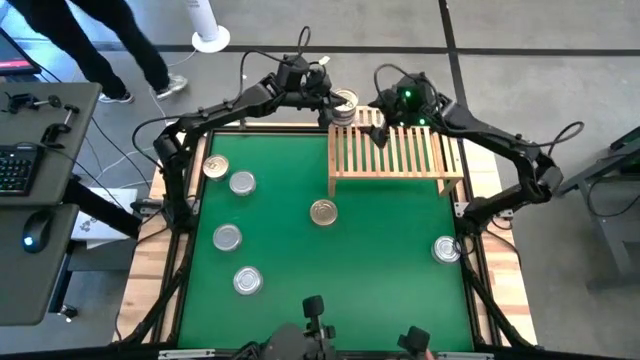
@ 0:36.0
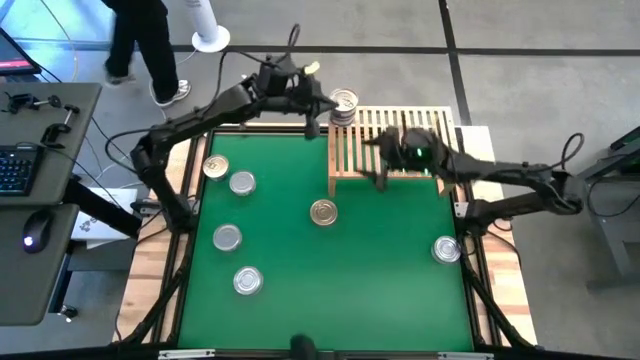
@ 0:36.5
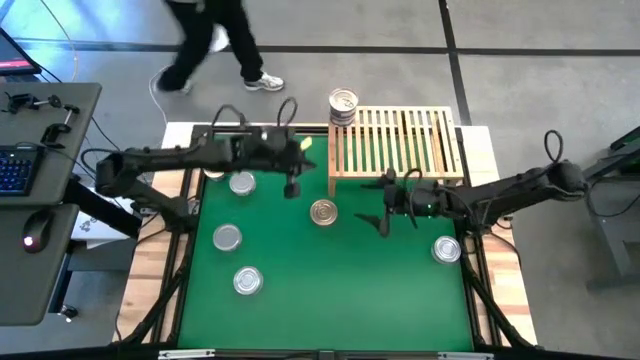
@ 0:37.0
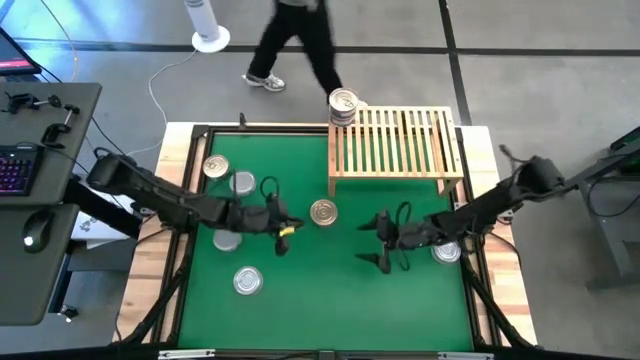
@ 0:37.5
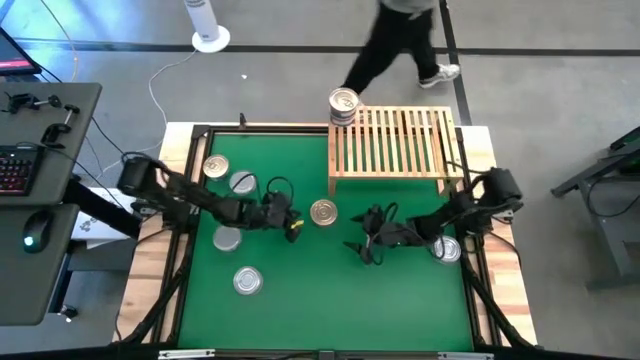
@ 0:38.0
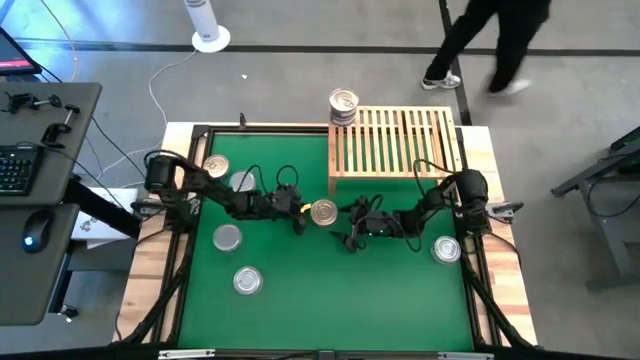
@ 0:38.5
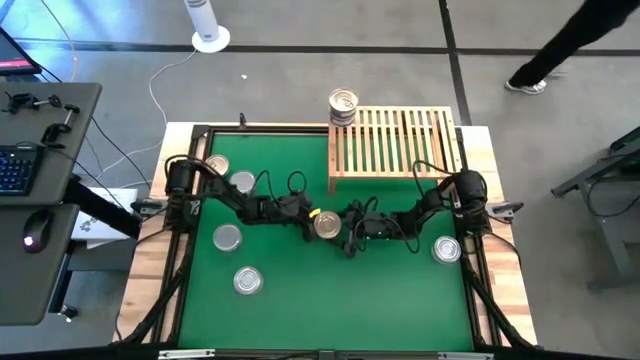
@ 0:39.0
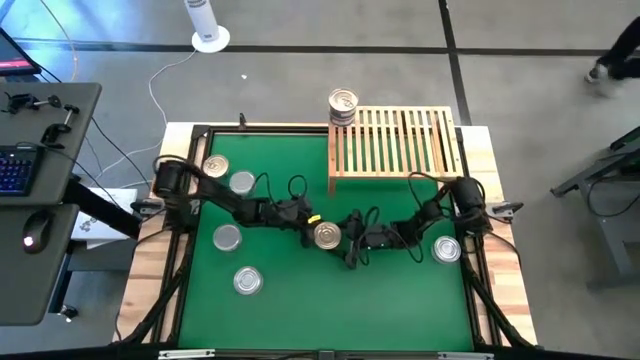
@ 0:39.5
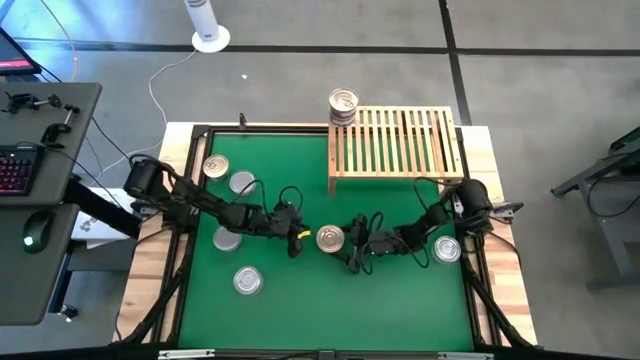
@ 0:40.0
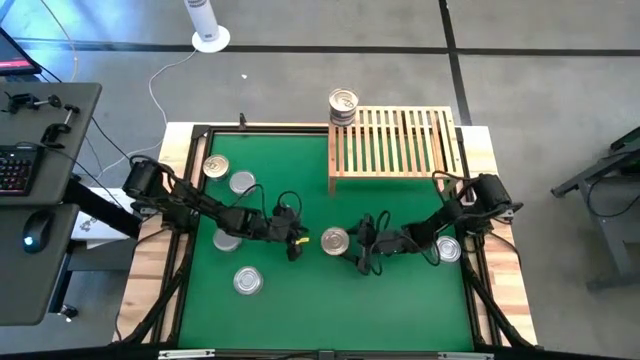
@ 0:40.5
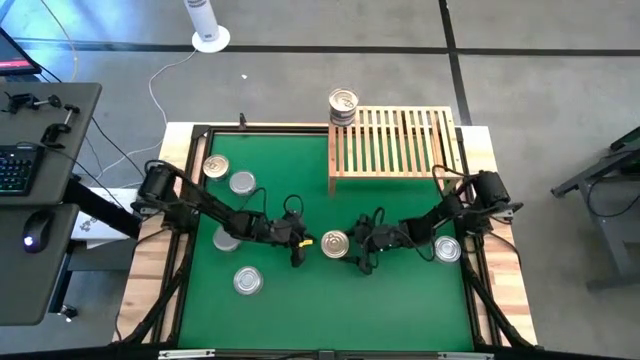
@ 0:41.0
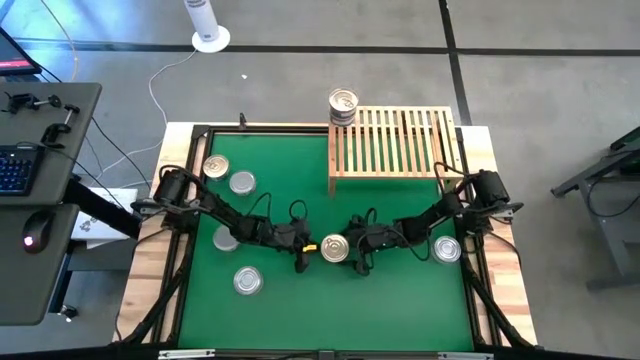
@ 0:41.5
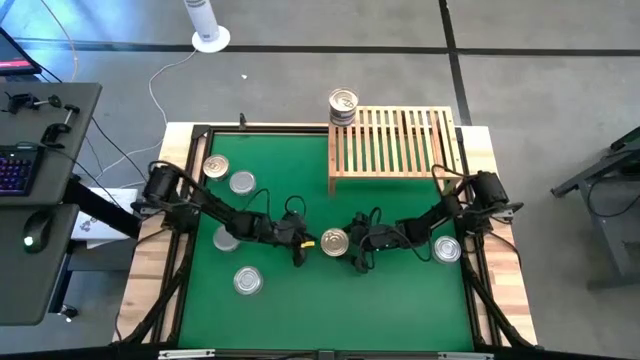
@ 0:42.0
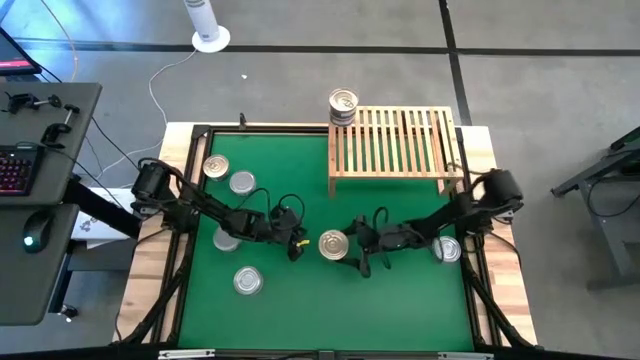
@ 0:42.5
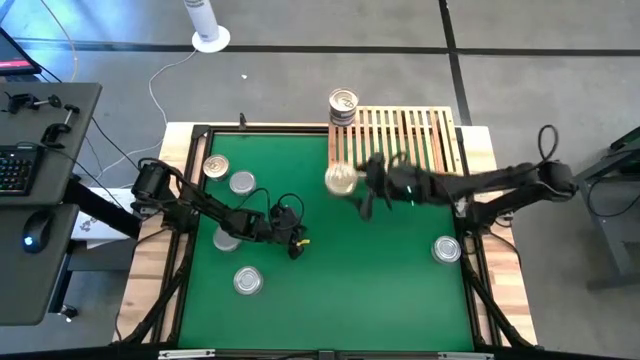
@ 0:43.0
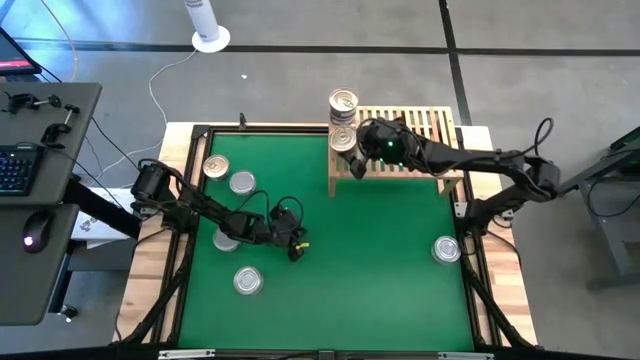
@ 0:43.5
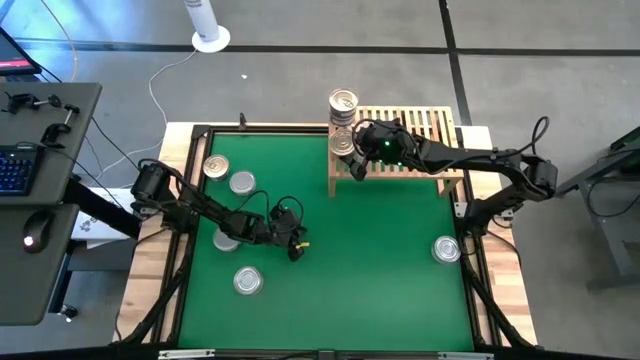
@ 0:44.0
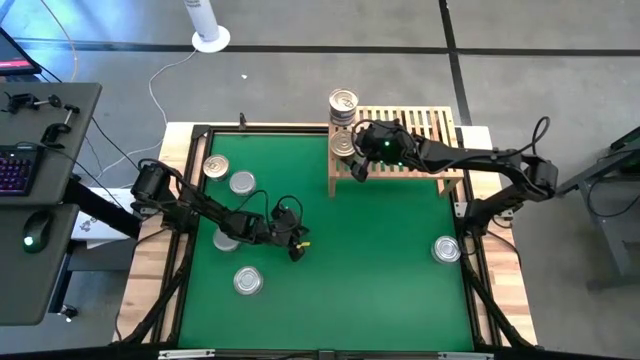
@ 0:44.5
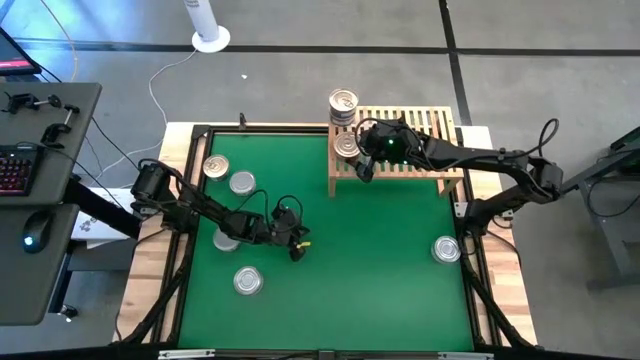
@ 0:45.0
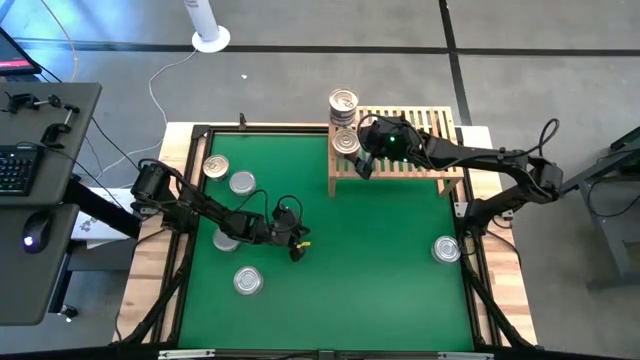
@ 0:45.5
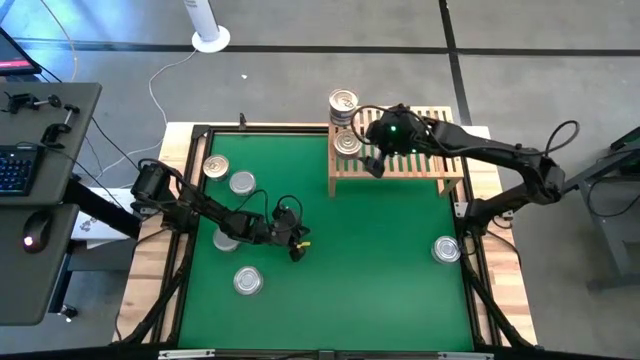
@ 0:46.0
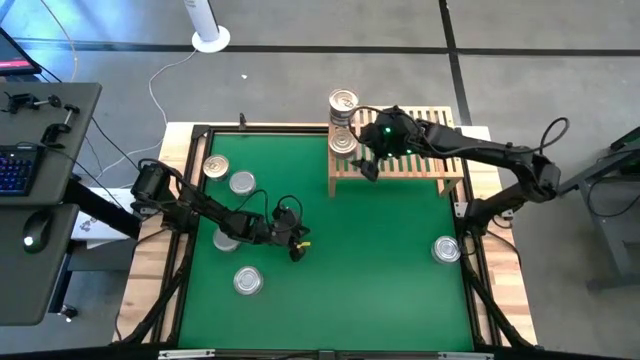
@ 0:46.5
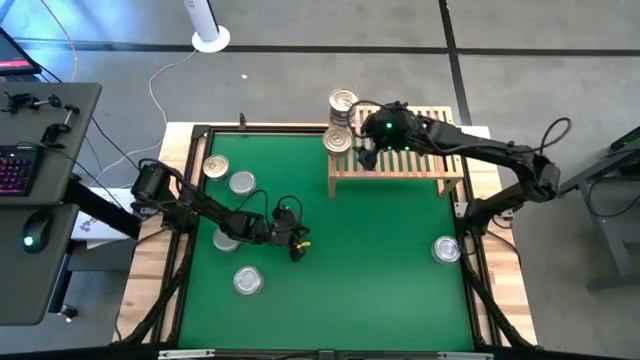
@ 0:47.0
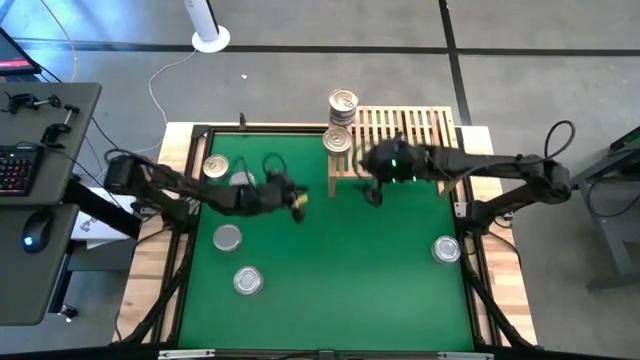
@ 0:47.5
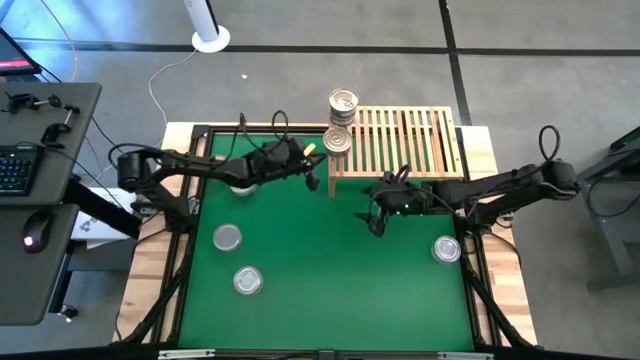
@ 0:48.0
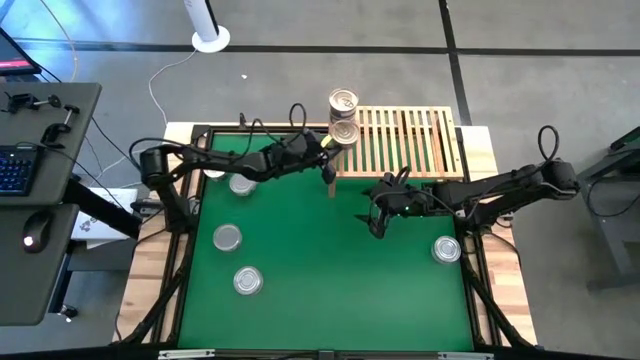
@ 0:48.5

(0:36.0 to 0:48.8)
Task: Stack canned seafood by type on shelf
Put the blue pink tuna can on the shelf aligned with the stacked blue pink tuna cans

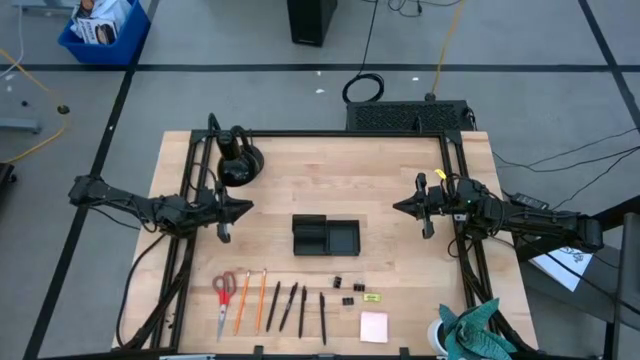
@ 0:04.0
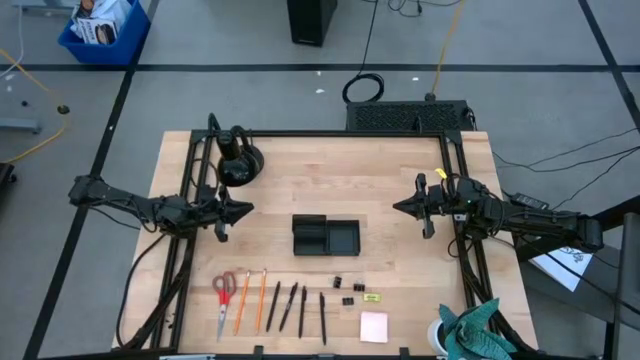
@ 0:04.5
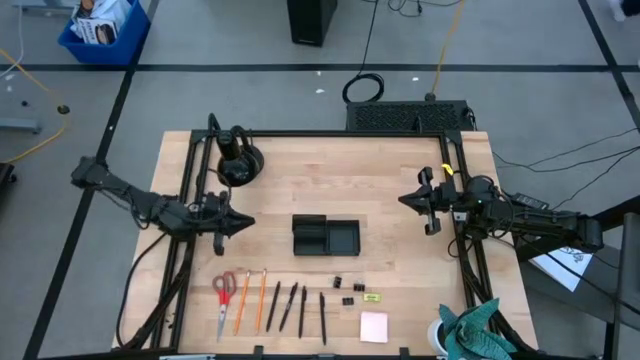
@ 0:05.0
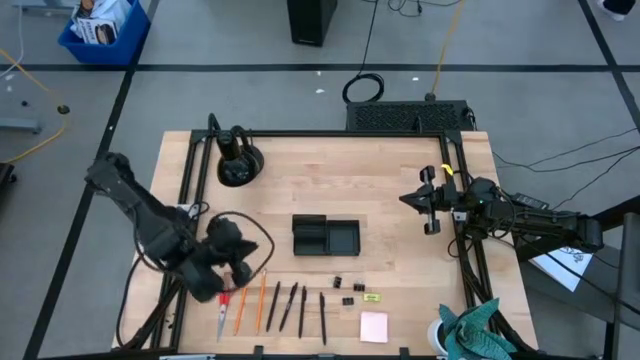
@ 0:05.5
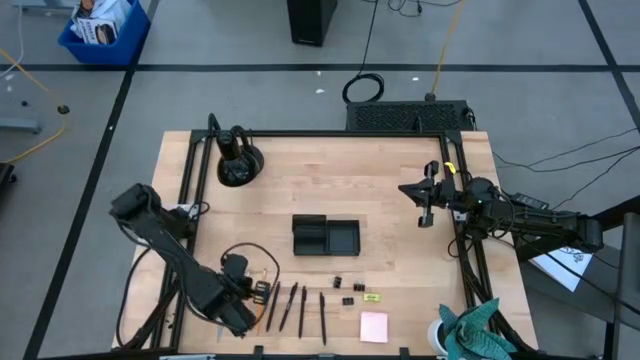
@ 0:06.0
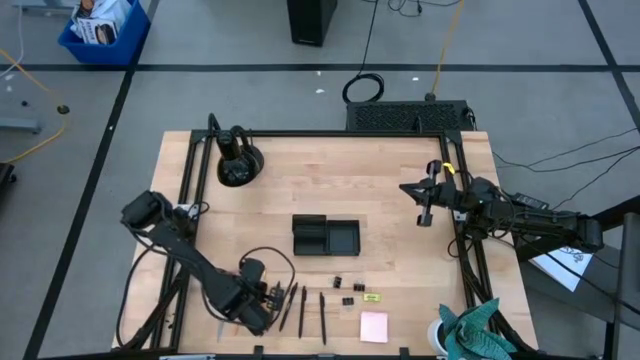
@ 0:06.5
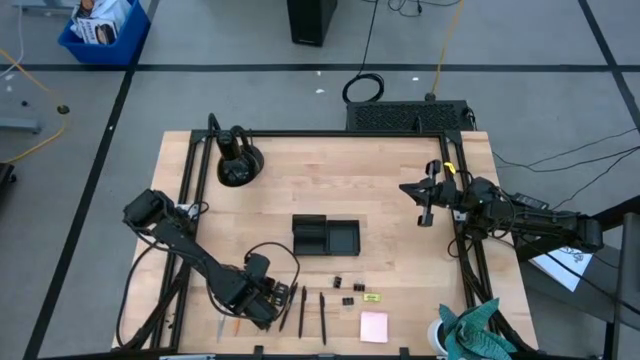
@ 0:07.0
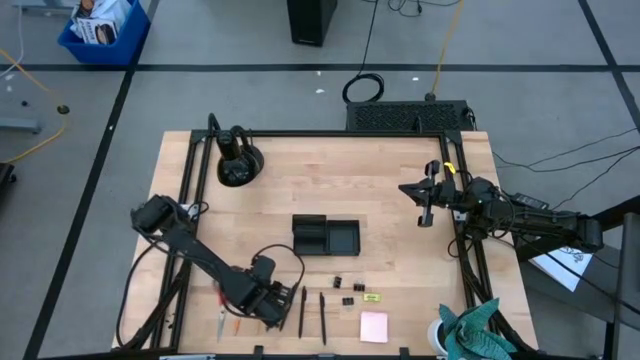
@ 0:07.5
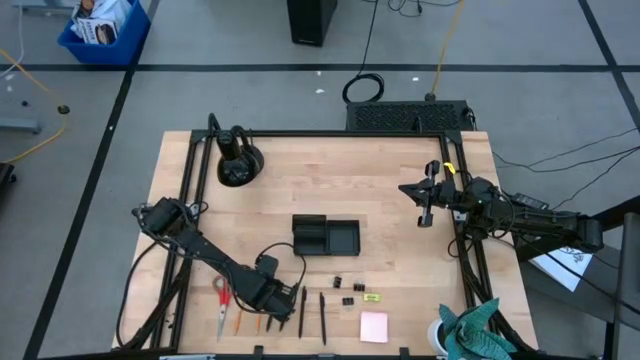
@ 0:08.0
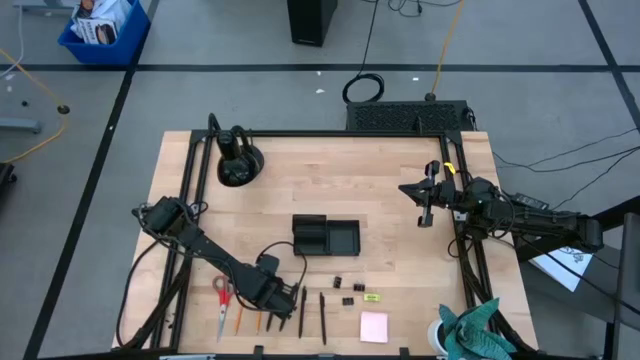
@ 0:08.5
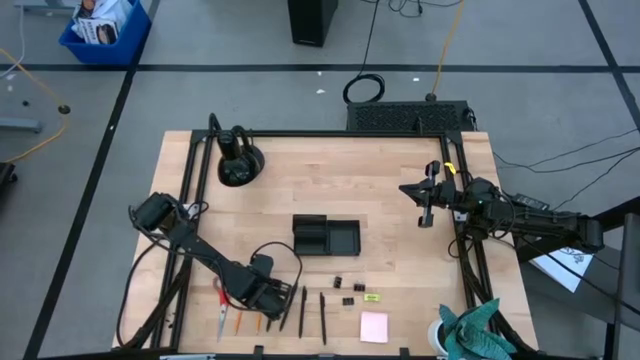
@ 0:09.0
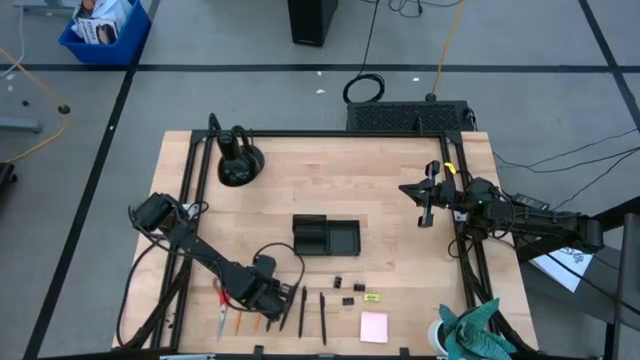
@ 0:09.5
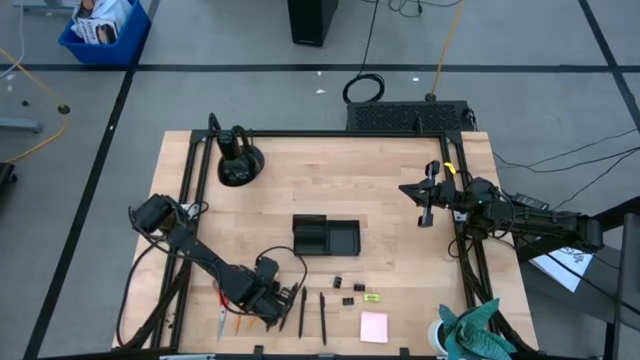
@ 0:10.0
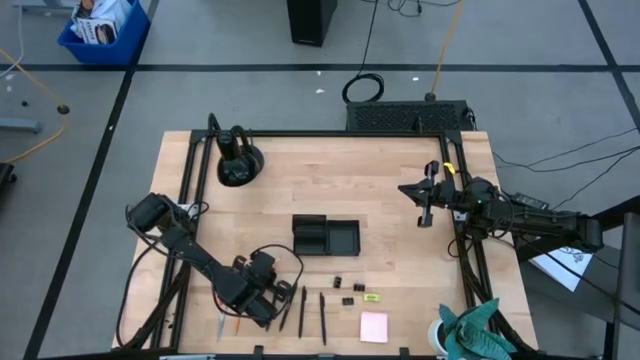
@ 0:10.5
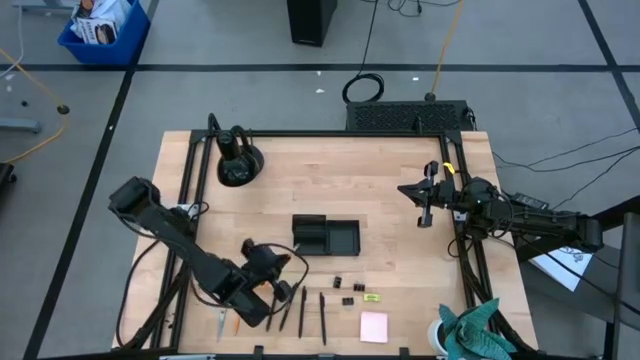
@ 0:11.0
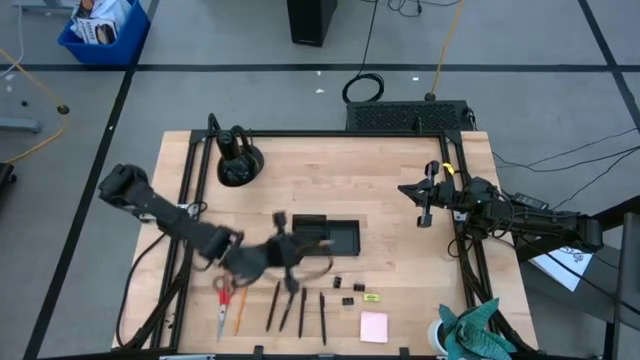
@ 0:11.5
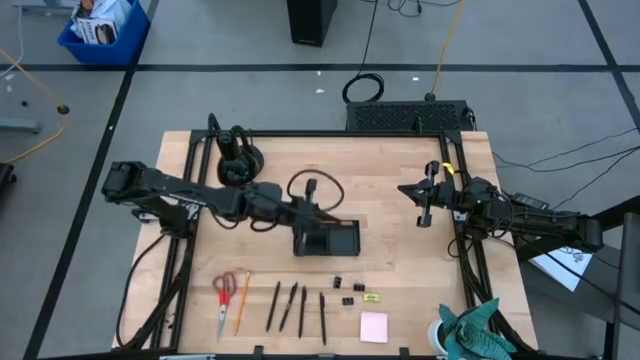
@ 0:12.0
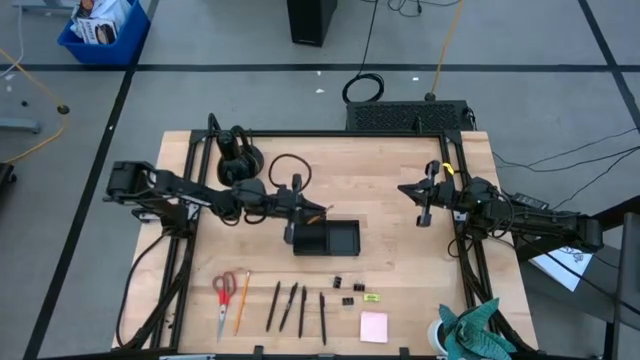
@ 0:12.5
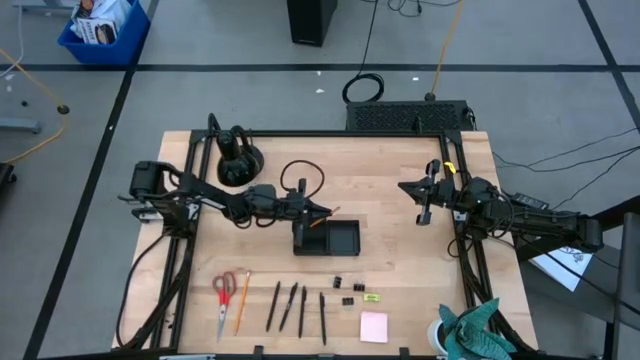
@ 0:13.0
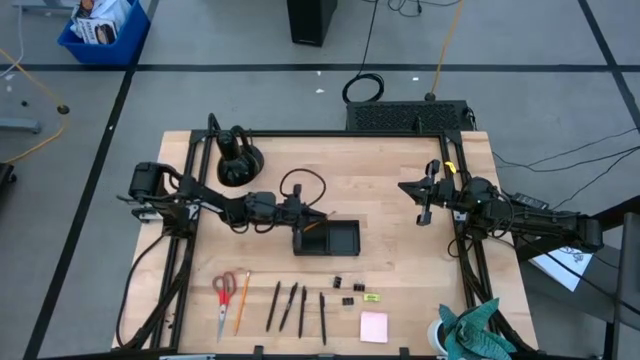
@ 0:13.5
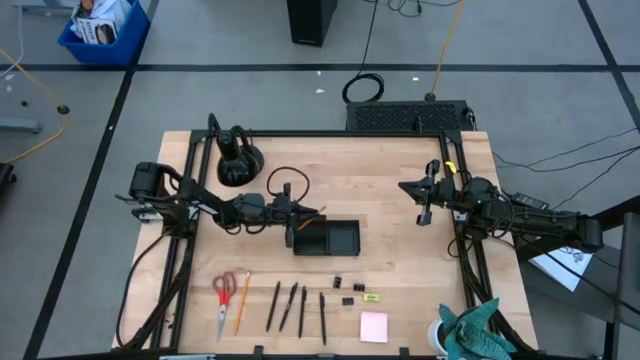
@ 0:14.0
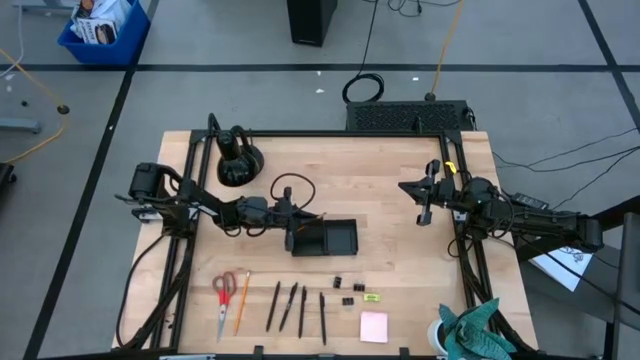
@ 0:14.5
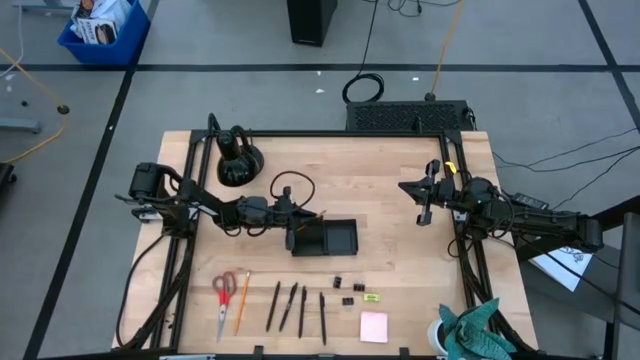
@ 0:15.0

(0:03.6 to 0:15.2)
Task: Pick and place office supplies into organizer
Put the orange pencil into the black desk organizer
